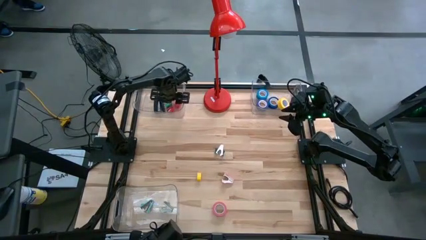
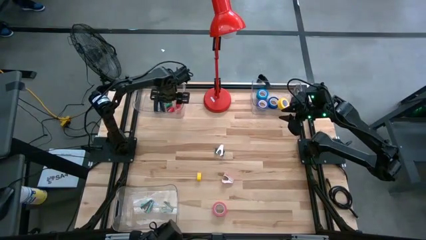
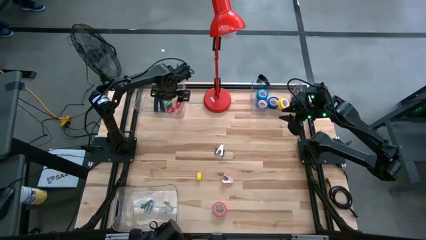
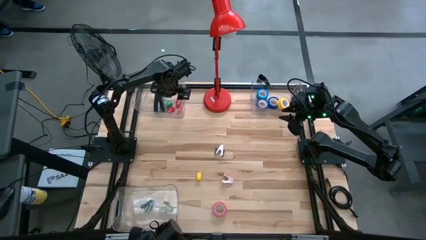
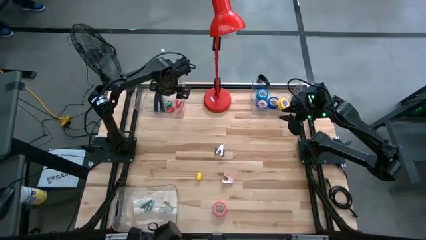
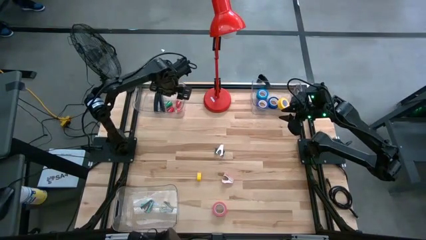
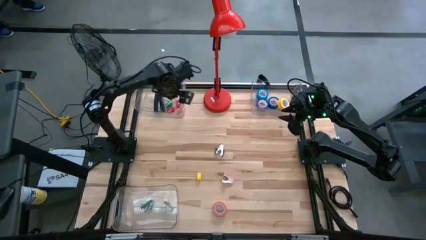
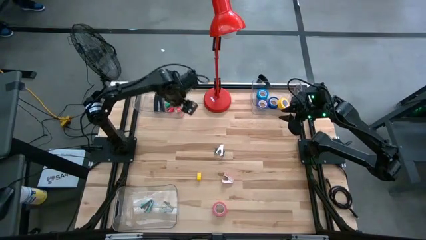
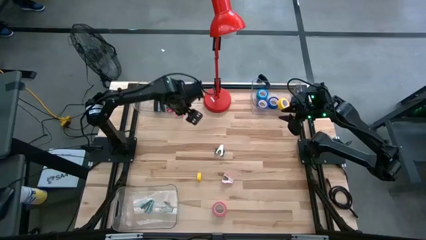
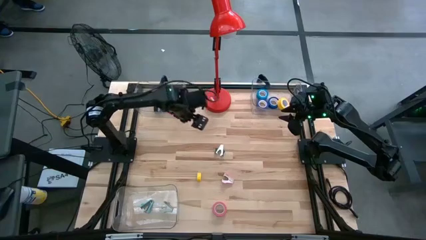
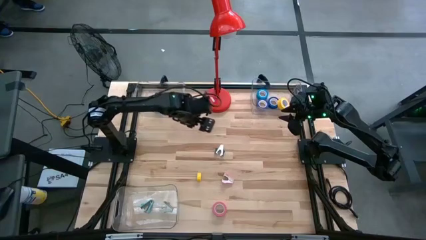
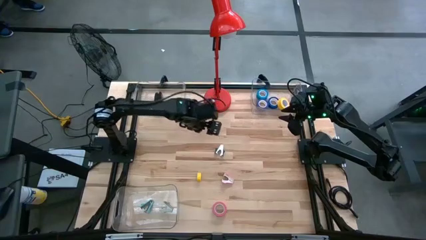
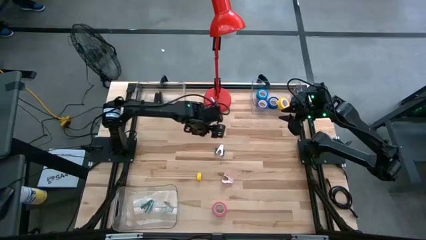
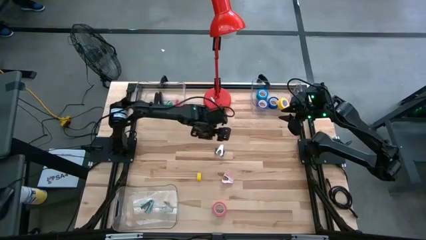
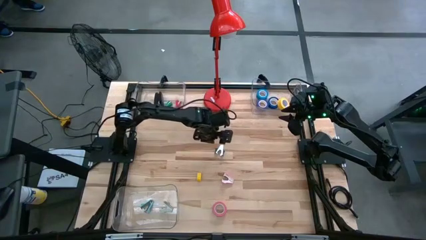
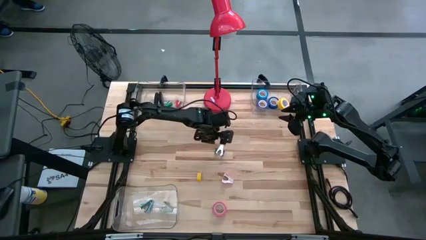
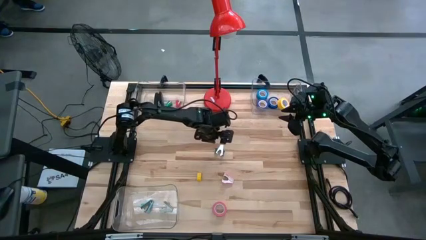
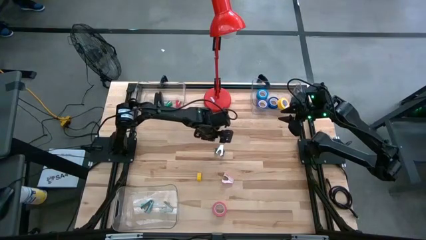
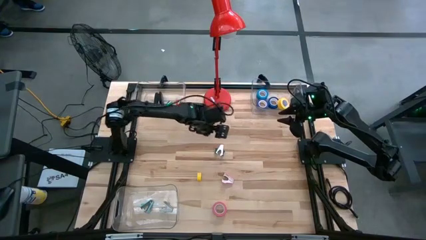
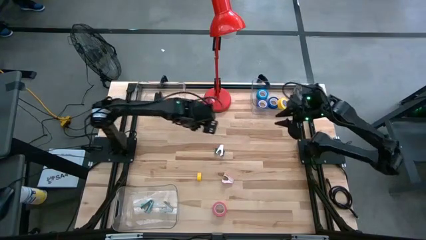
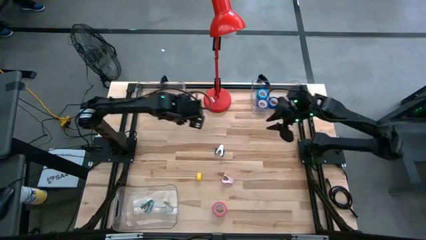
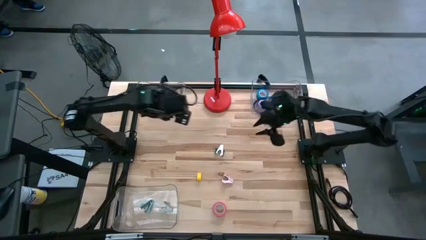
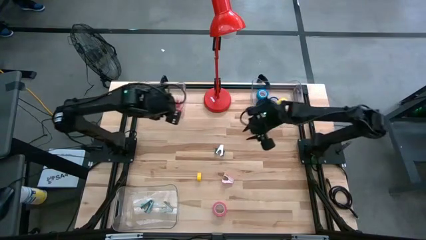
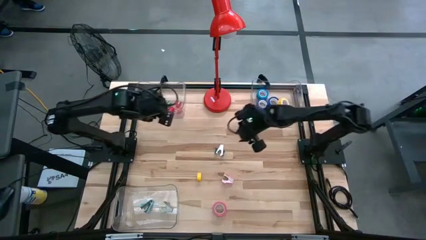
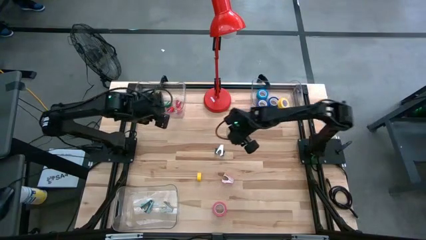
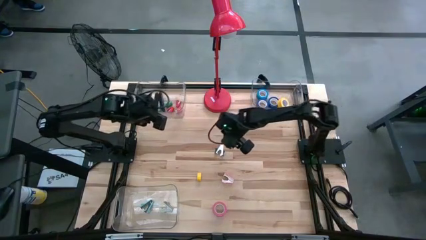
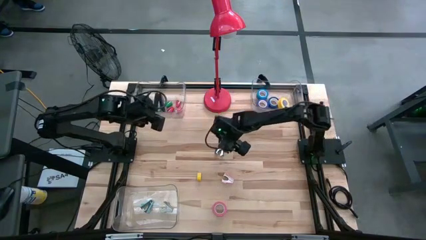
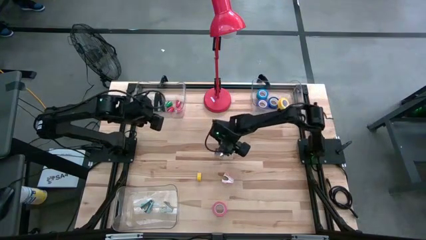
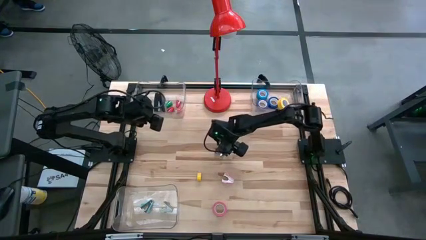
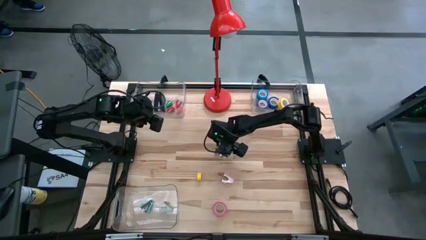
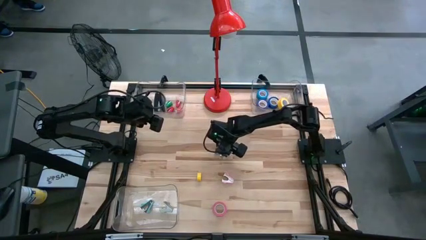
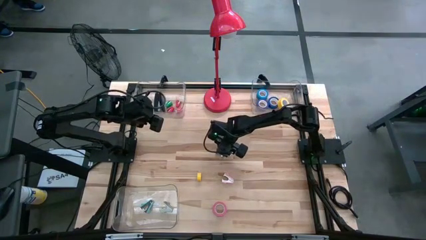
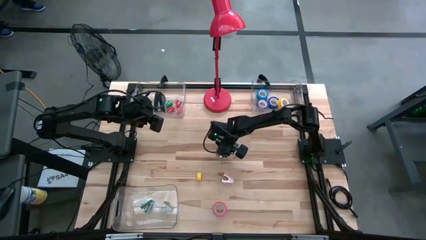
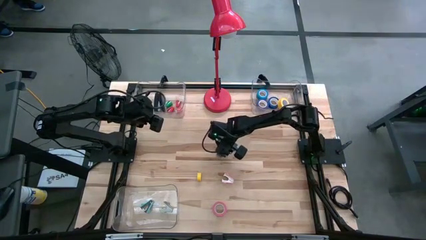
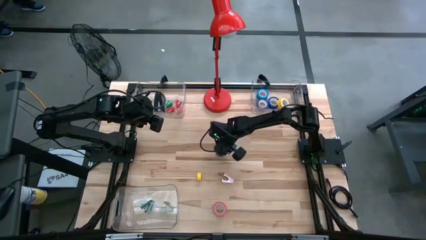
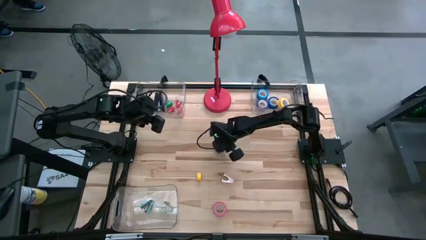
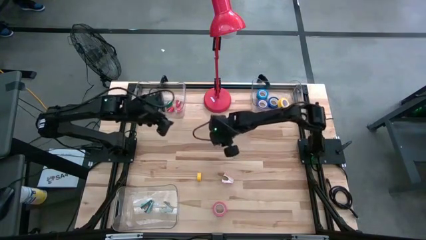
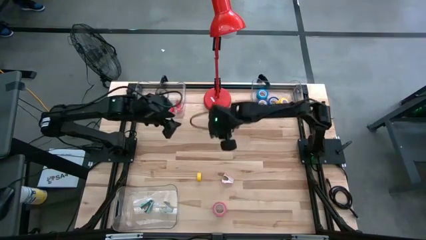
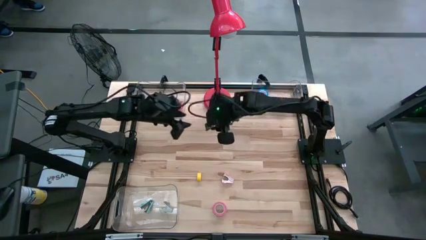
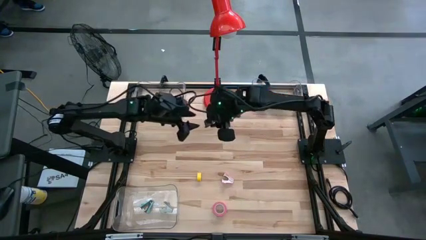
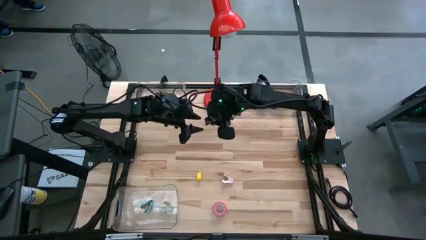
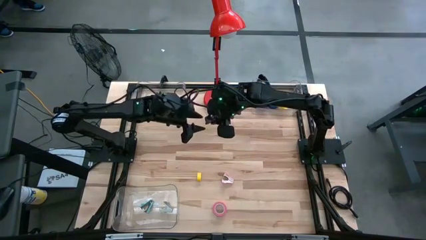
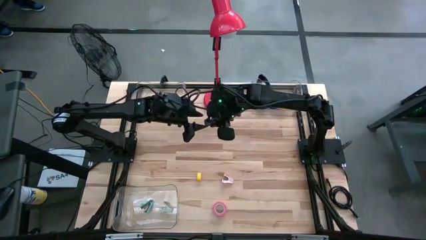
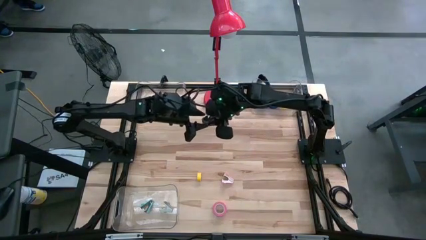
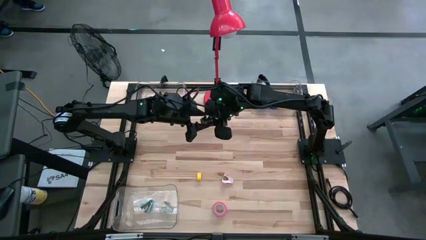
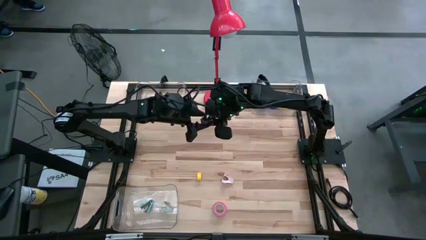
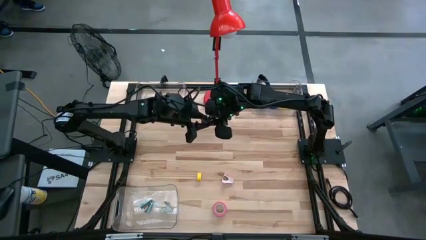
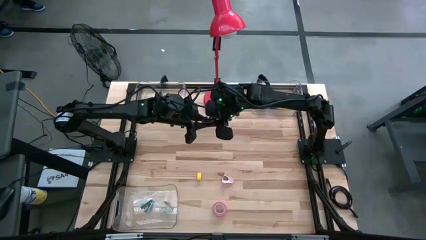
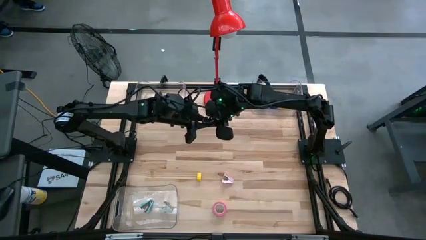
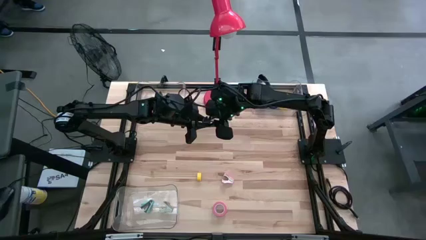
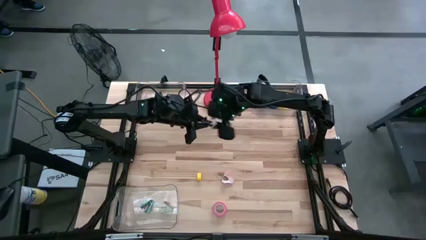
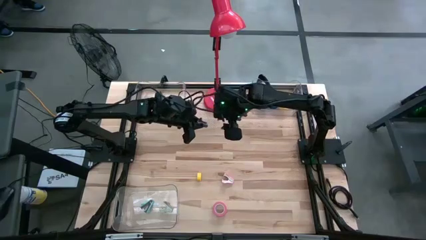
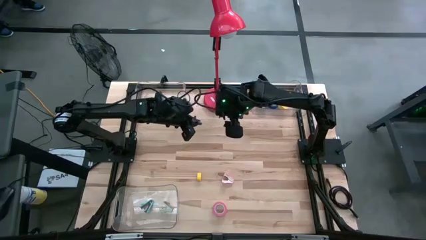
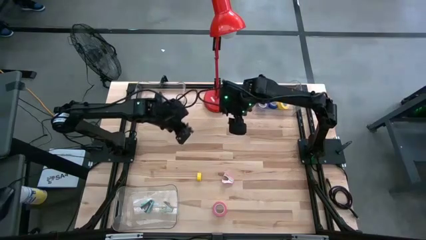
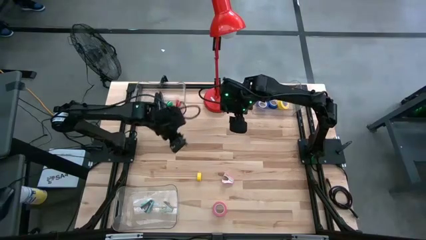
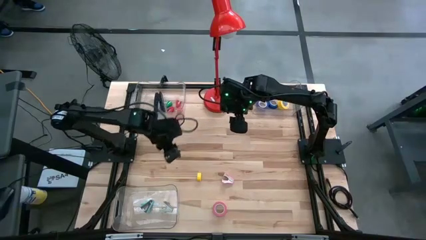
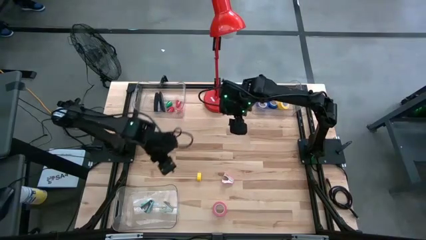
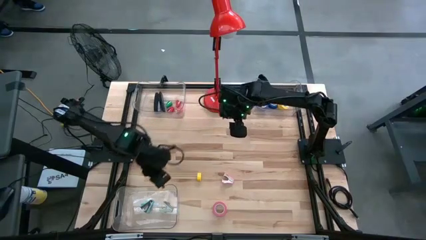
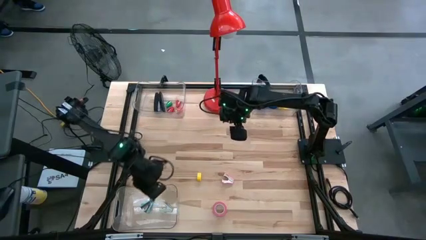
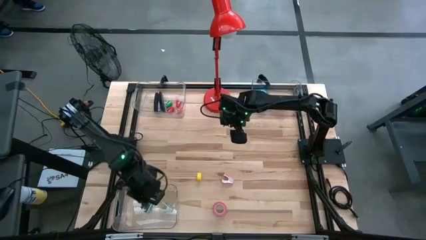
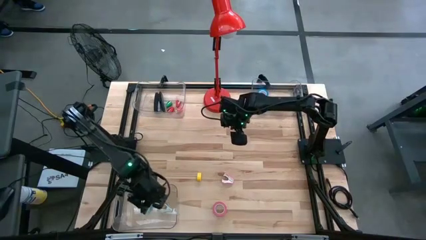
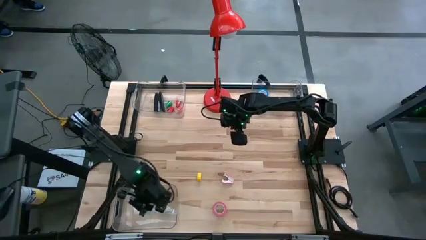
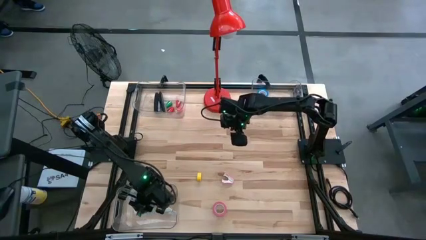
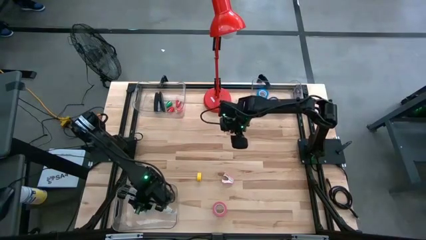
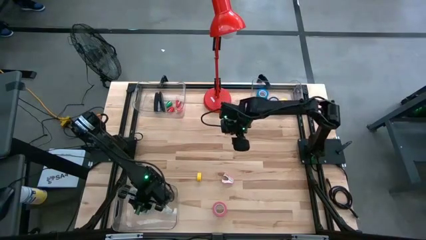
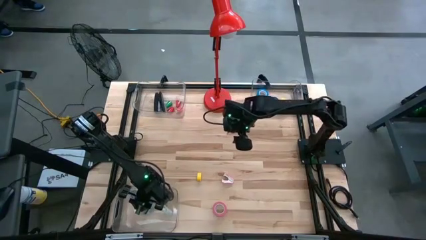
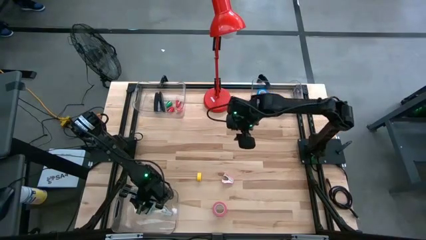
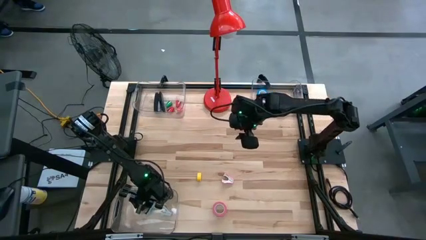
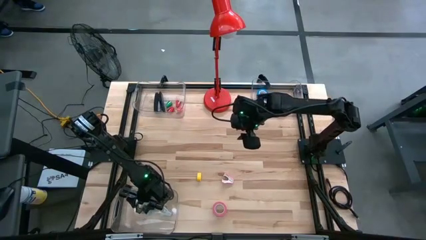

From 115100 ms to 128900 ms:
Task: Pick and place Stapler, Stapler remover, tape
Put the black stapler remover into the bottom transparent bin

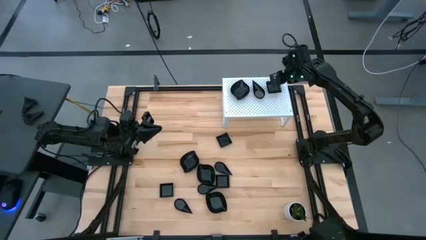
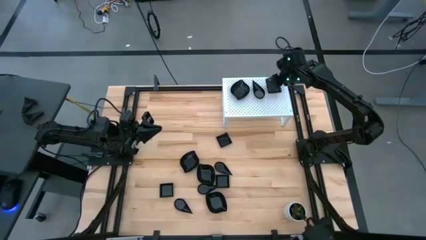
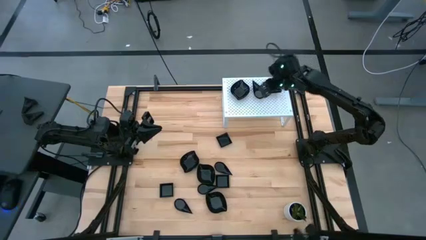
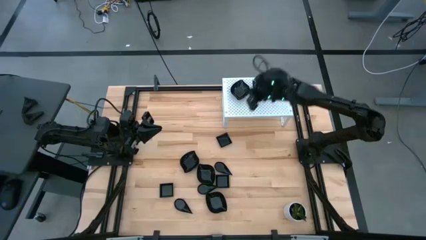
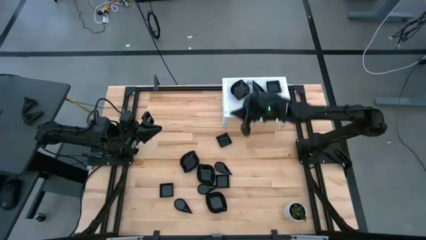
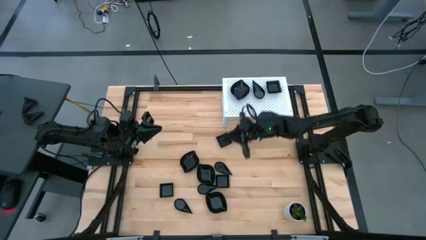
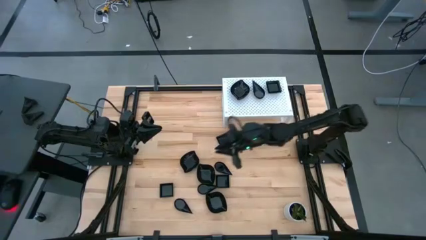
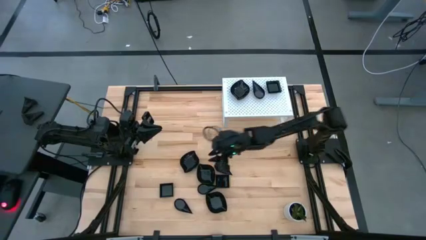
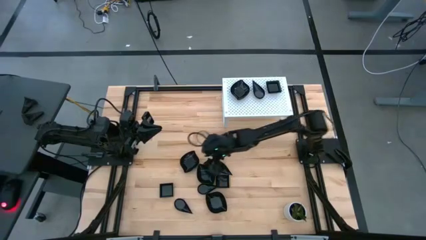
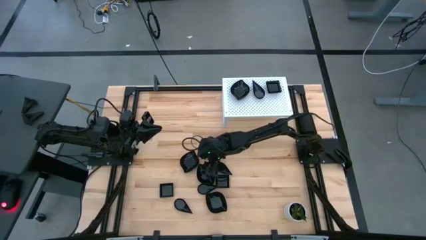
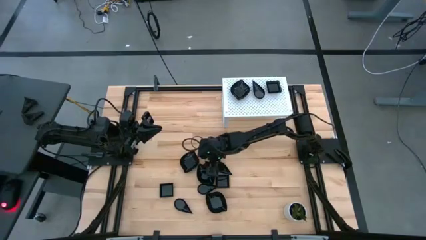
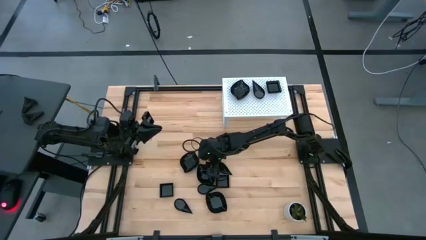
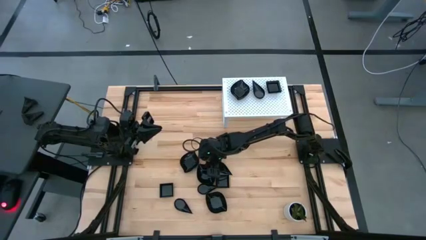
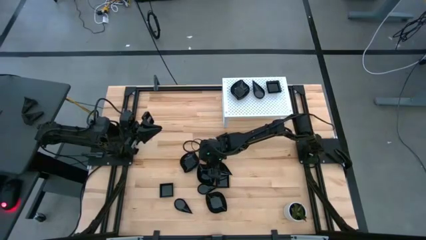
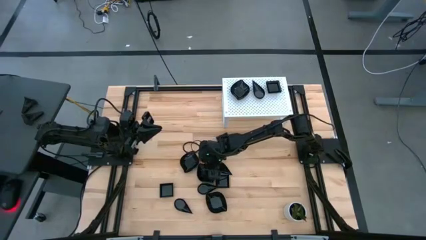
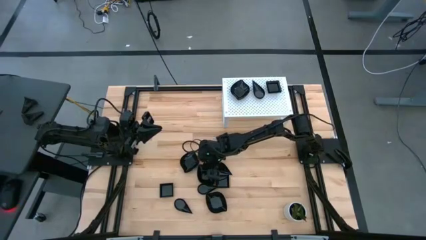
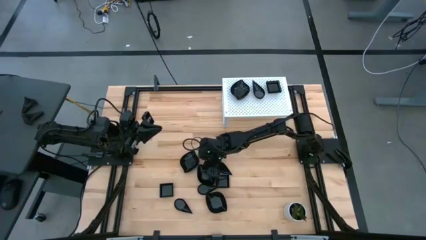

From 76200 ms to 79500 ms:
Task: Pick & Place Mini shaped plates
Stack the leaf shaped plate on top of the leaf shaped plates on the shelf
